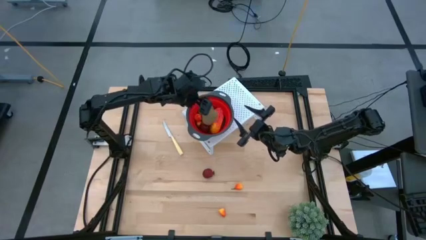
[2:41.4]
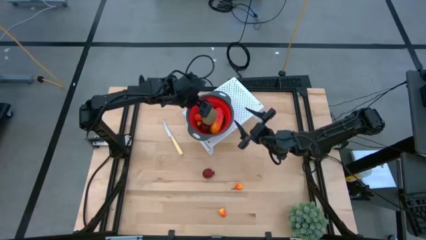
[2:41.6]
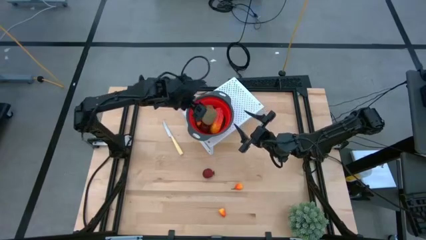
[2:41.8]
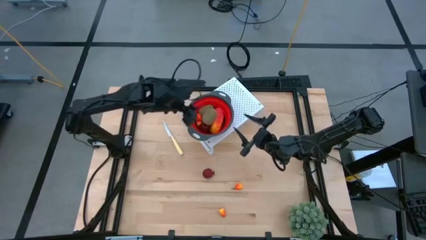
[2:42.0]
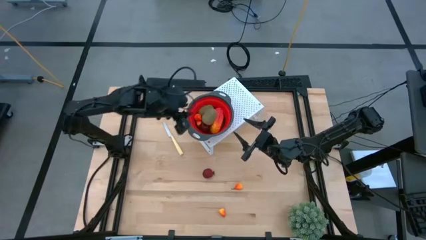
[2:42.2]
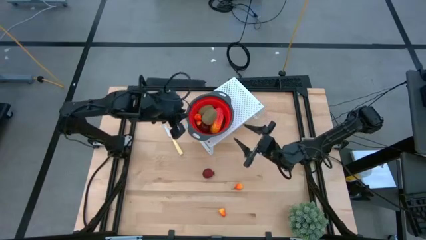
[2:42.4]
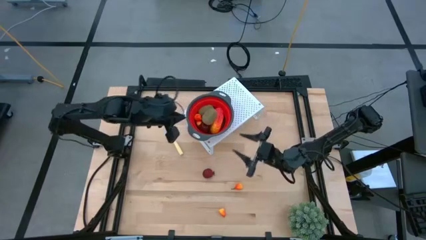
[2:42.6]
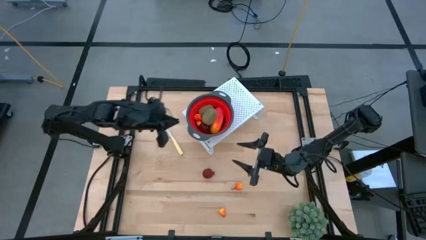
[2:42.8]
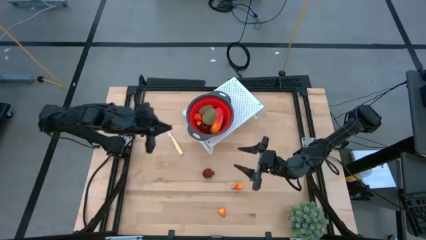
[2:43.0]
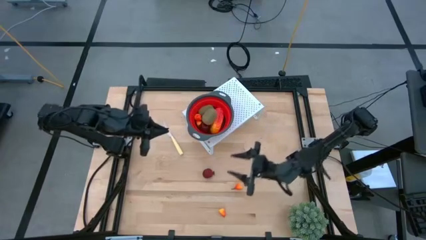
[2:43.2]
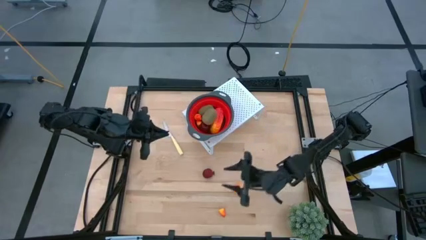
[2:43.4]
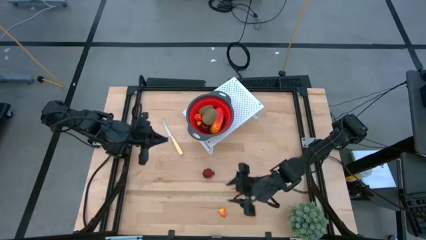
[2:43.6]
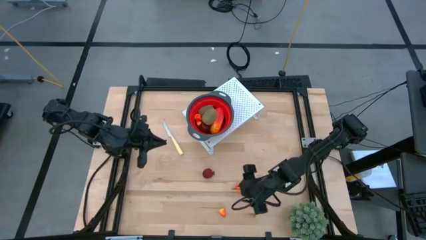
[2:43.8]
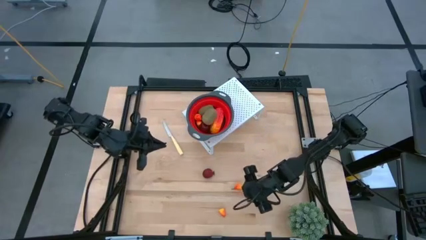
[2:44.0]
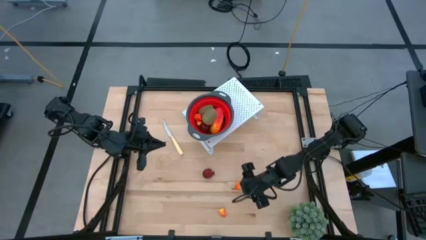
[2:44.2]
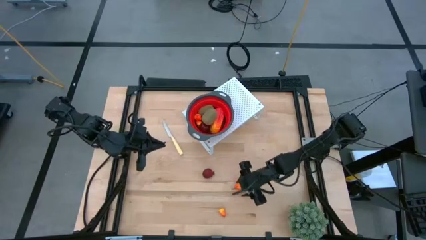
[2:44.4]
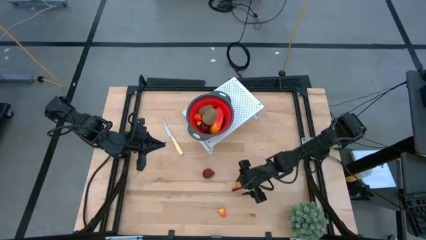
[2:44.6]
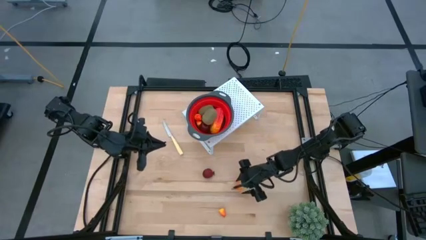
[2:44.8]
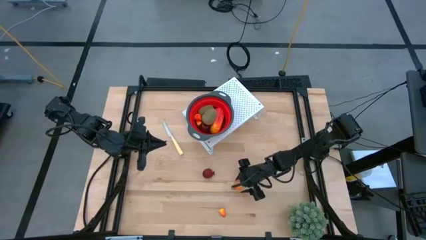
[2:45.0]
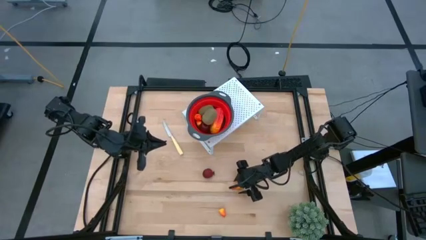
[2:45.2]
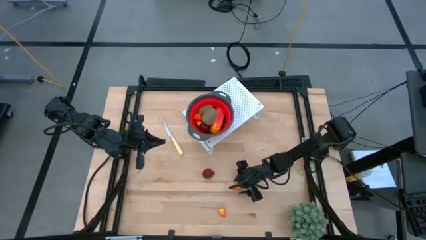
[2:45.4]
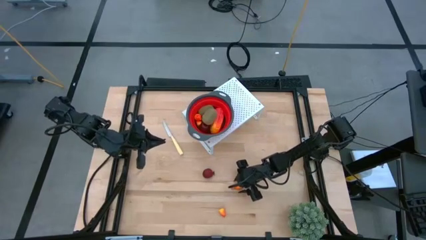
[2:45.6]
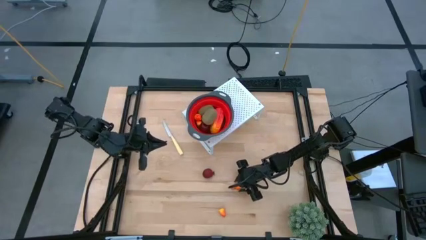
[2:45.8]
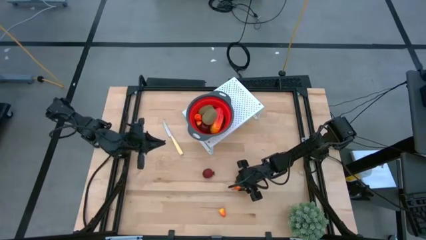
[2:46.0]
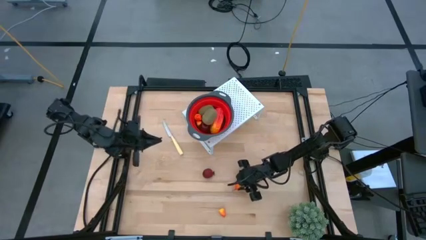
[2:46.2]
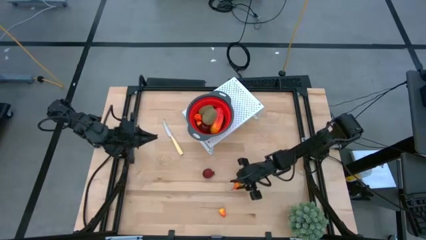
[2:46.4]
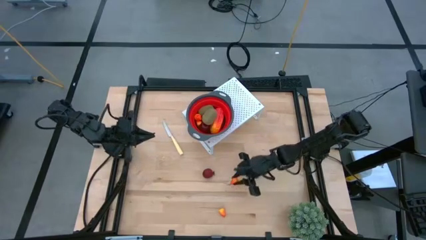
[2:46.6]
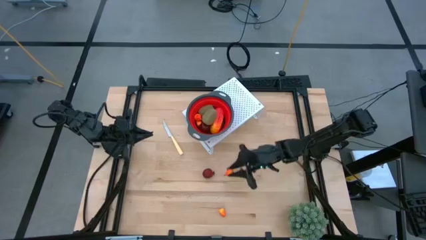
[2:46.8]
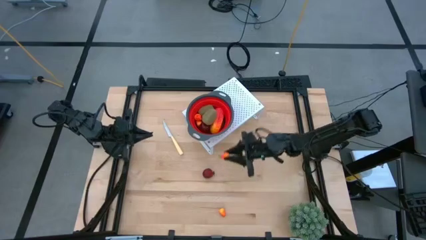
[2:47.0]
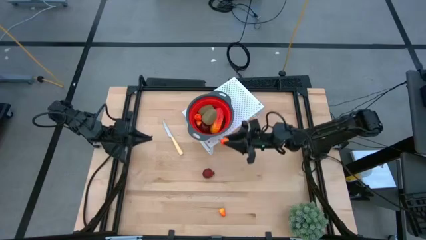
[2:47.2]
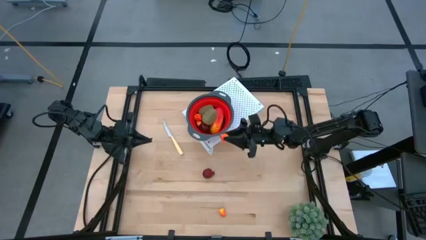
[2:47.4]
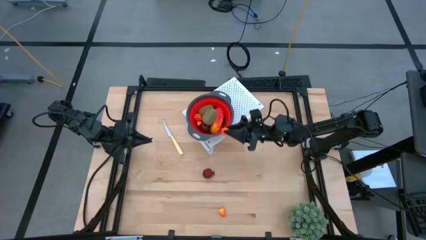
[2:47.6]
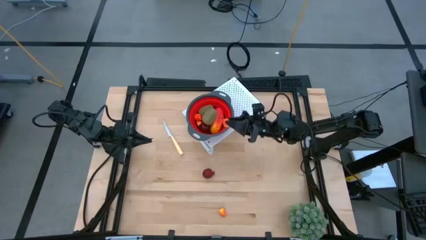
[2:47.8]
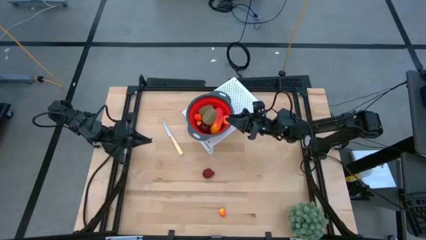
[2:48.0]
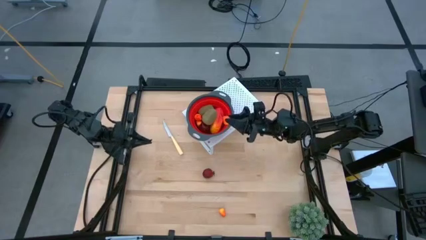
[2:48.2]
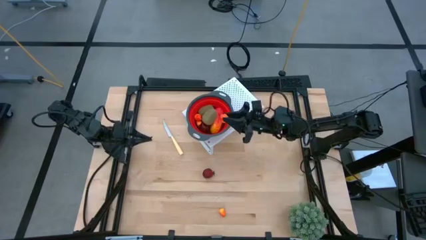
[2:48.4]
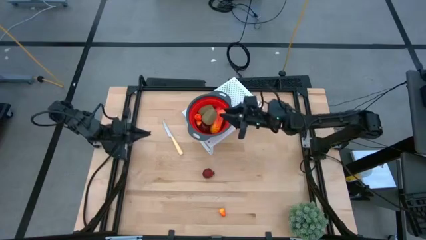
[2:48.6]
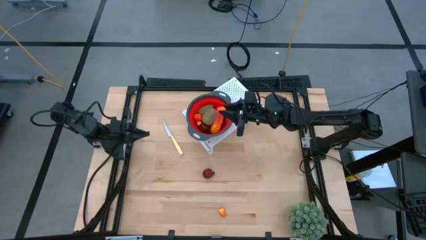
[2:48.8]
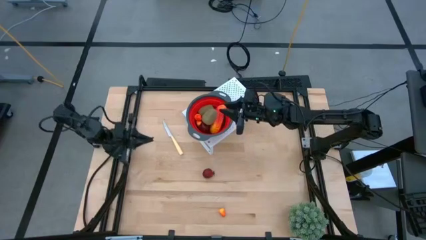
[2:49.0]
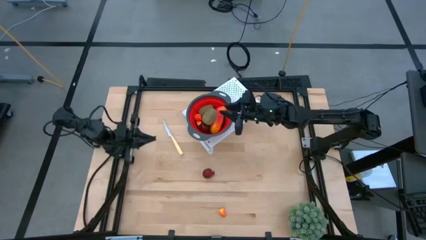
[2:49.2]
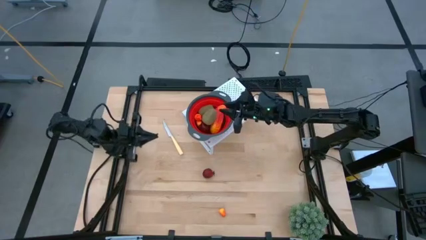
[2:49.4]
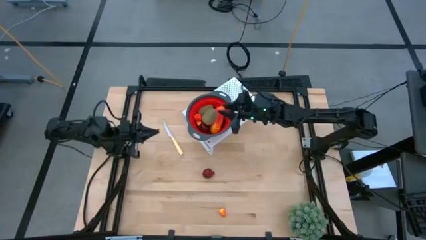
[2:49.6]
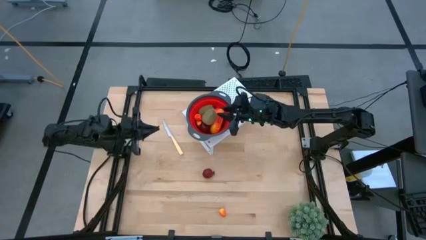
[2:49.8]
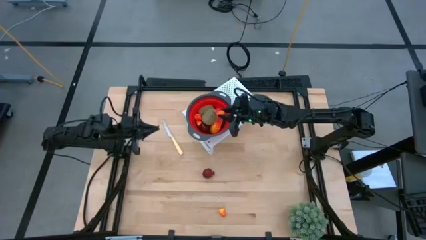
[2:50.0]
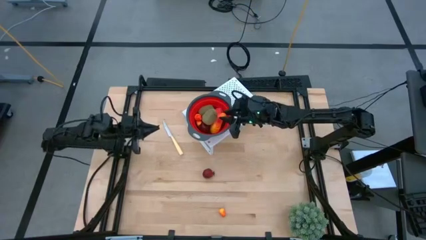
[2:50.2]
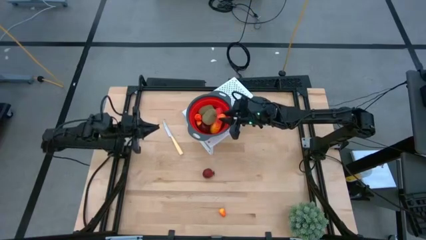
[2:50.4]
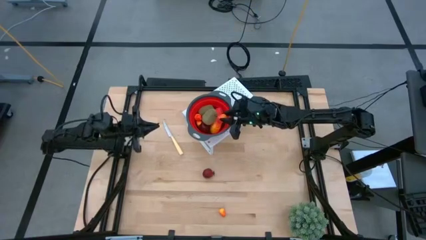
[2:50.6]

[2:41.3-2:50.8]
Task: Pick & Place Fruit
Put the peach into the red strainer bowl on the shelf

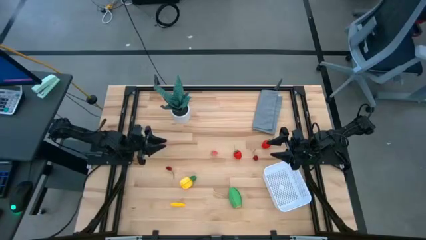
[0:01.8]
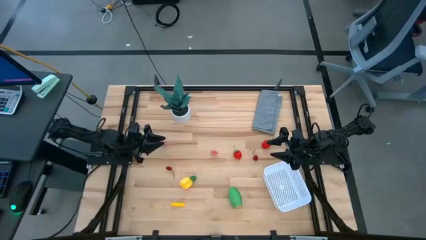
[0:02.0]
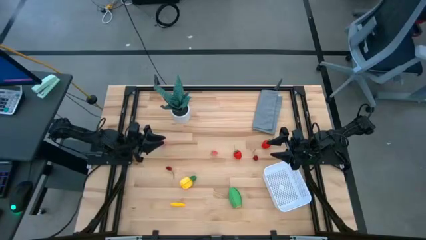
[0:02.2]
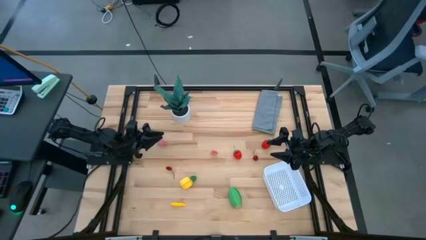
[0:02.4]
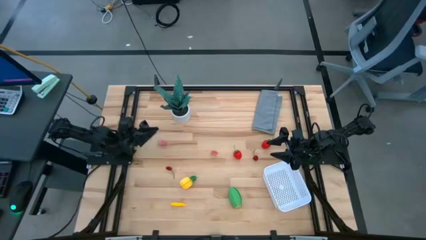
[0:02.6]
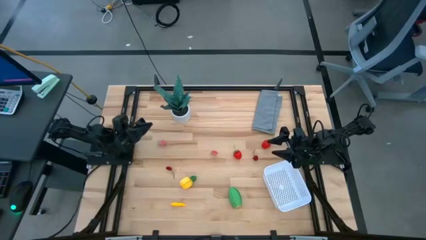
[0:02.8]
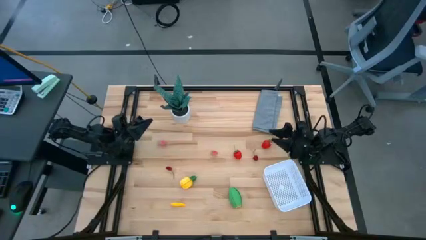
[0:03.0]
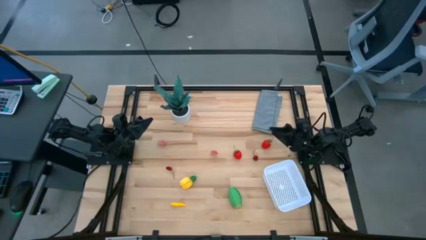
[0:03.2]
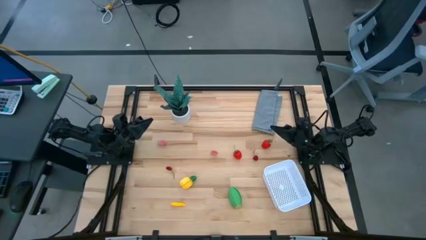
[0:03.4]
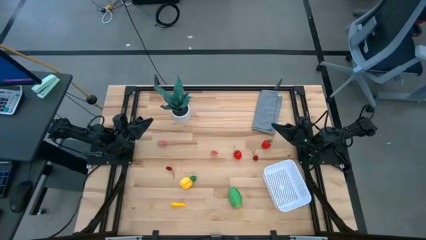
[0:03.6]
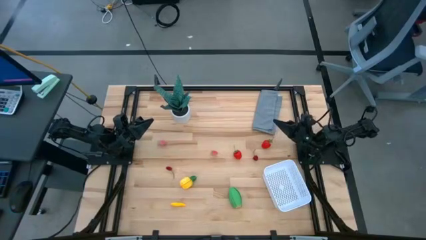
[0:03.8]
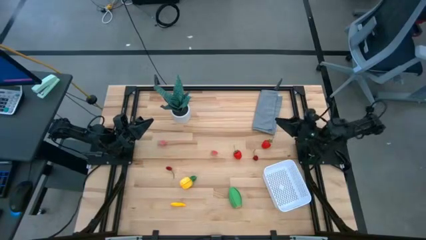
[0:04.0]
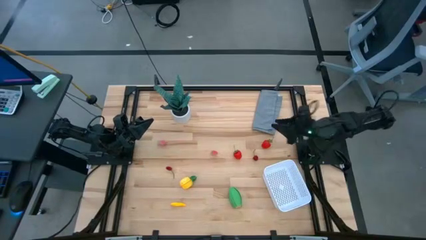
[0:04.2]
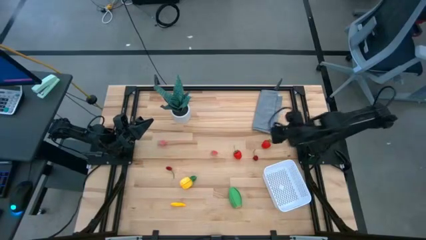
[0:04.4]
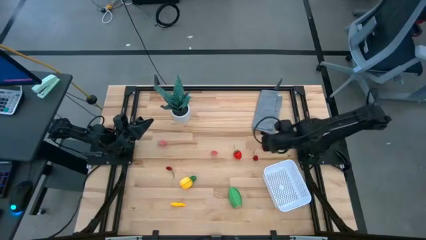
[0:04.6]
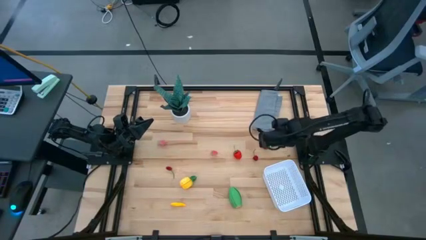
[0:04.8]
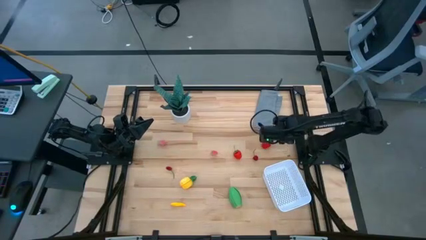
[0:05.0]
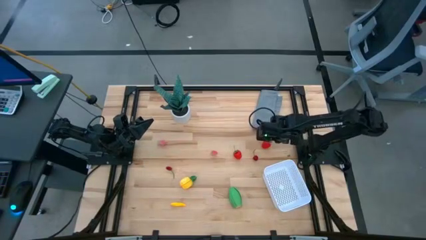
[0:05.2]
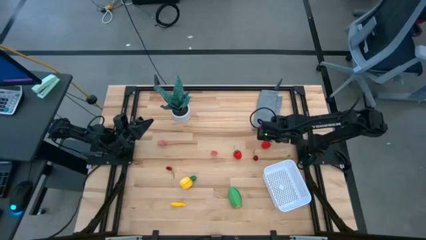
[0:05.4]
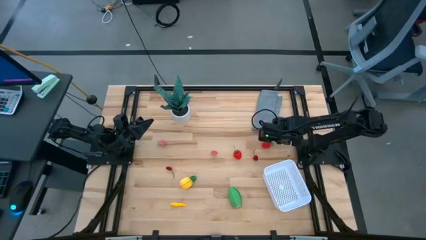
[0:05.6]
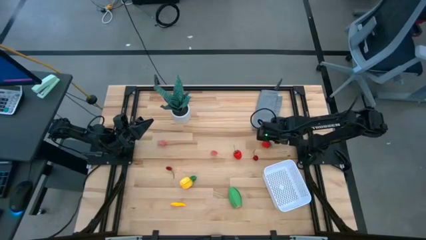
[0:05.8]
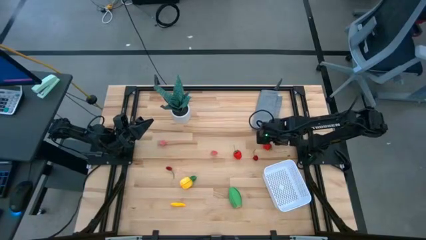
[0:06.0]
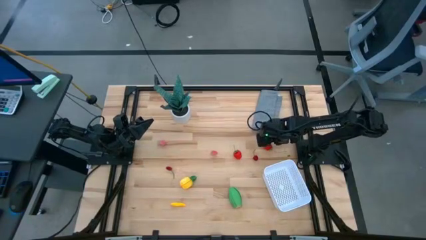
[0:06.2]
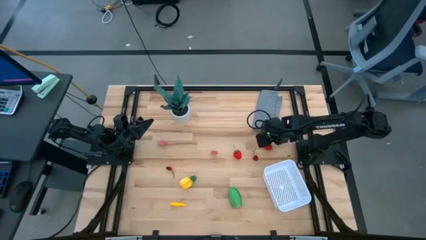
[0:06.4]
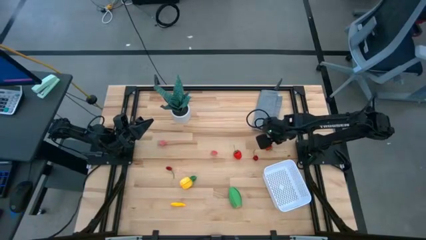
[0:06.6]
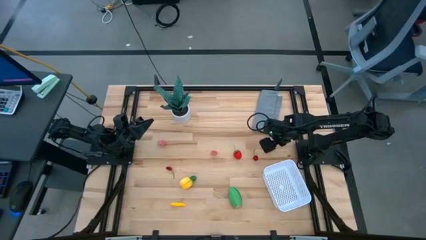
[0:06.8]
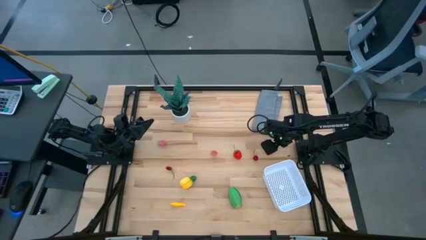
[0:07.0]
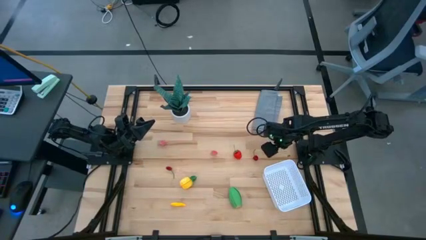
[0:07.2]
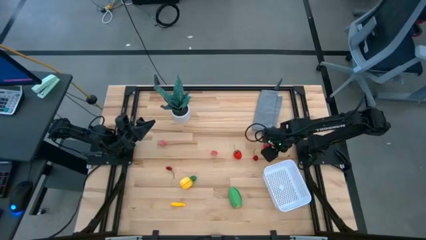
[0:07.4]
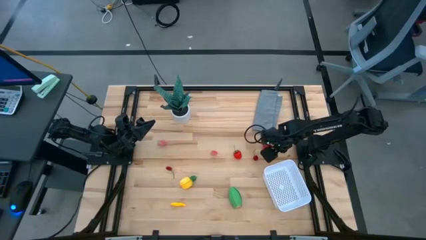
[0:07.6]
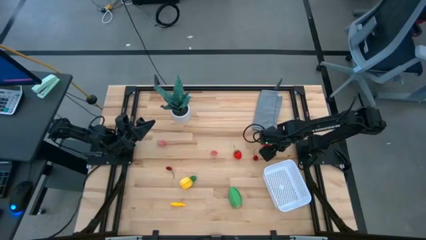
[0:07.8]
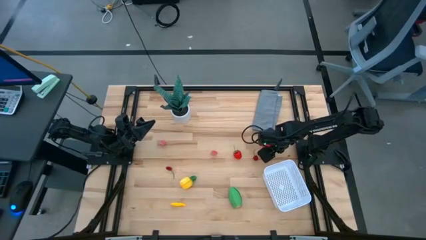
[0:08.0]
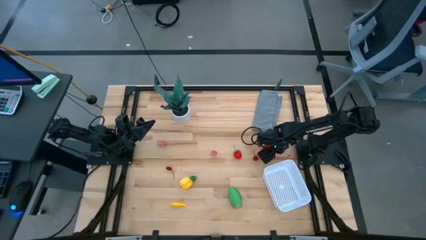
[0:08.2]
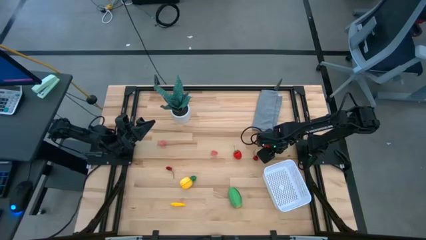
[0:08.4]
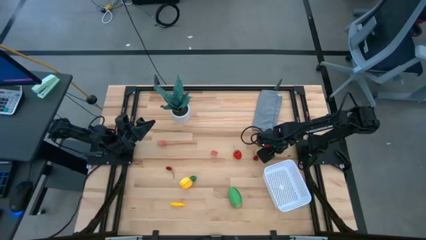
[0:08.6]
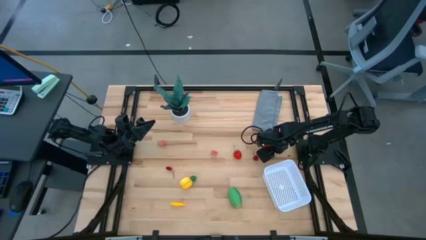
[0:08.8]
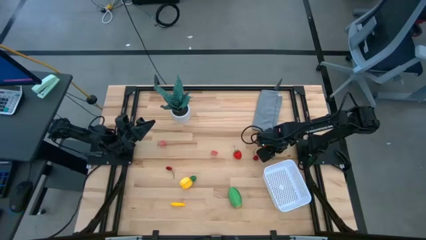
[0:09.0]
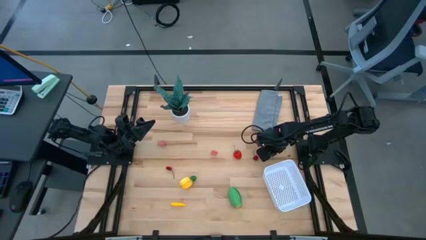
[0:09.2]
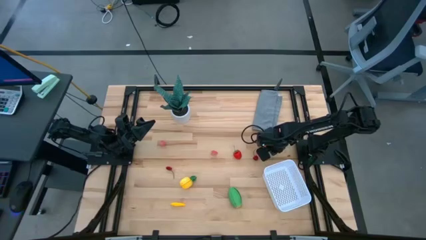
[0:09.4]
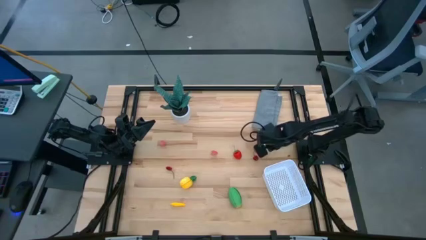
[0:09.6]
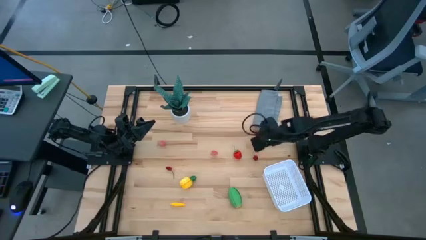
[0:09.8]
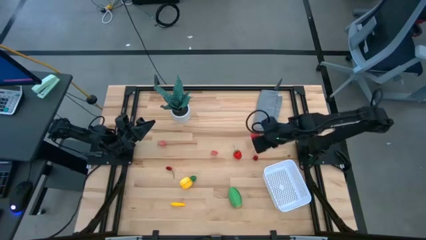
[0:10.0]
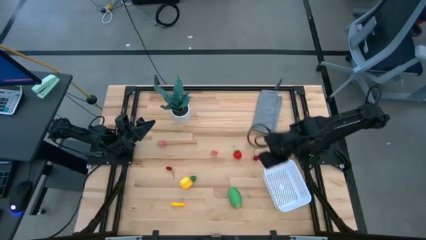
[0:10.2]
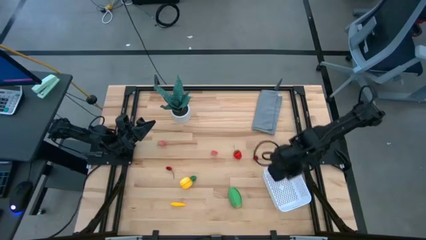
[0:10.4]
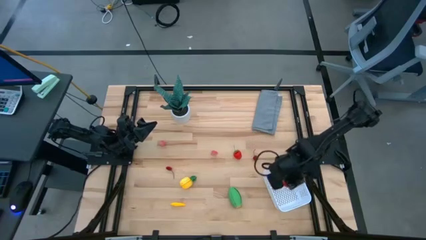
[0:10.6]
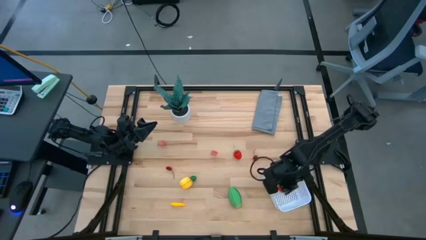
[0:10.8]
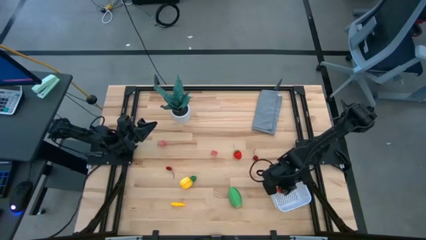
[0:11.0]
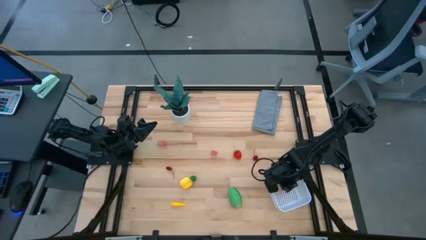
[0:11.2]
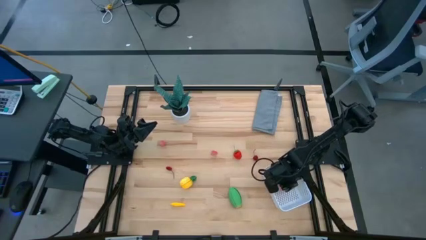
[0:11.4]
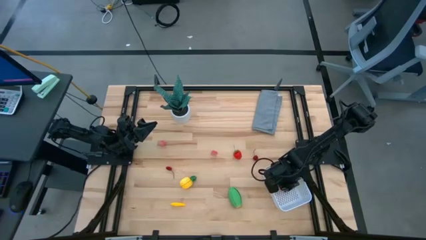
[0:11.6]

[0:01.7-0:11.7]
Task: Pick and placing Produce into tupperware
Put the right red strawberry into the white basket
